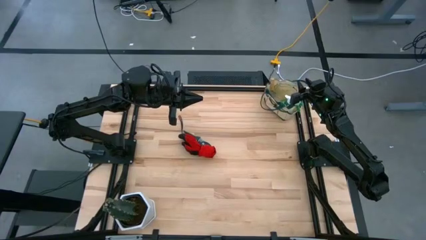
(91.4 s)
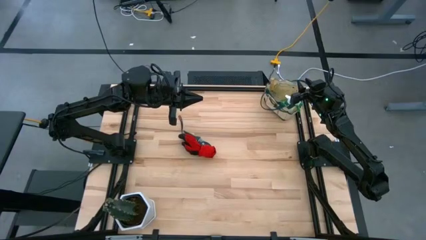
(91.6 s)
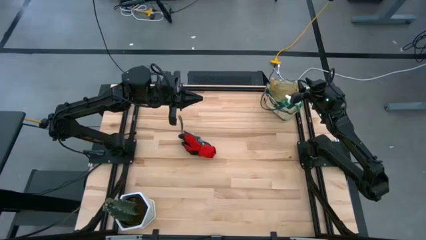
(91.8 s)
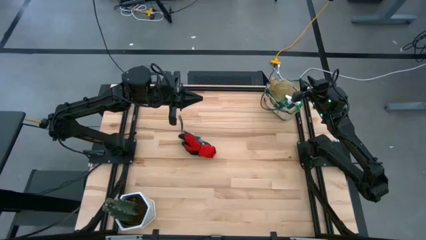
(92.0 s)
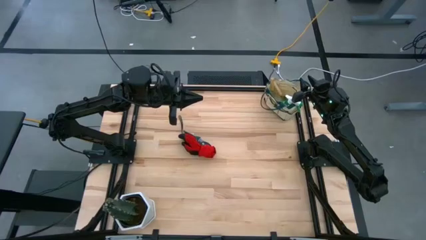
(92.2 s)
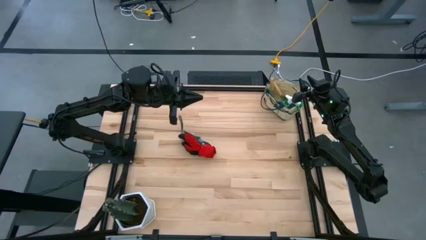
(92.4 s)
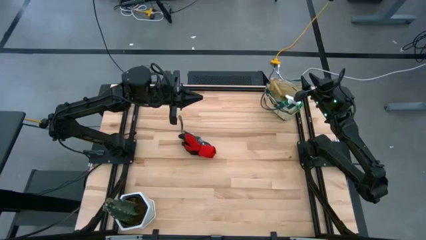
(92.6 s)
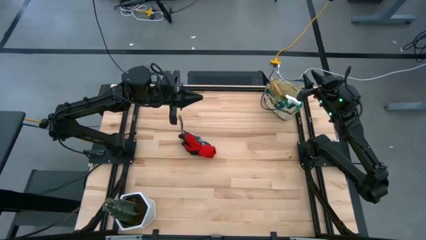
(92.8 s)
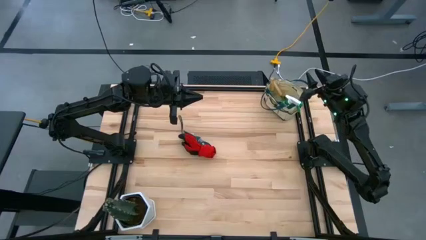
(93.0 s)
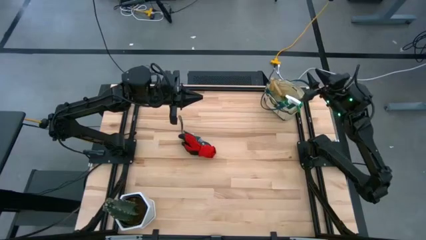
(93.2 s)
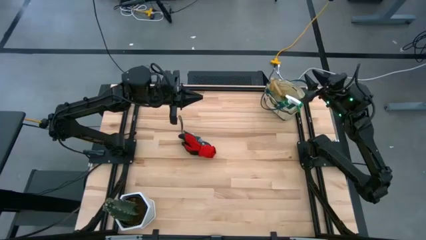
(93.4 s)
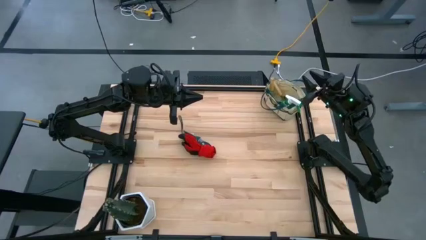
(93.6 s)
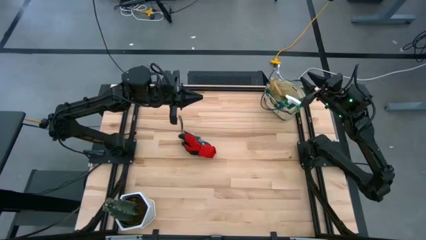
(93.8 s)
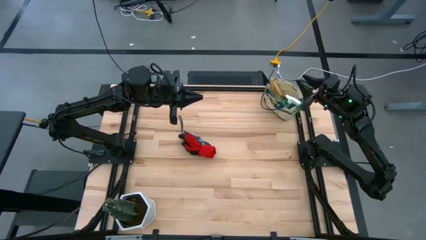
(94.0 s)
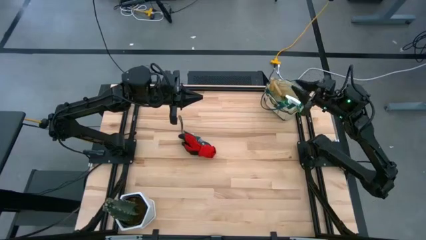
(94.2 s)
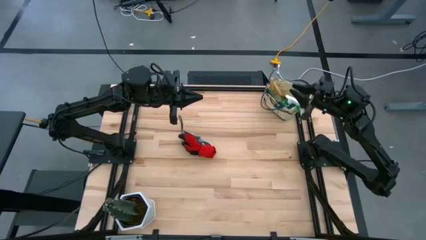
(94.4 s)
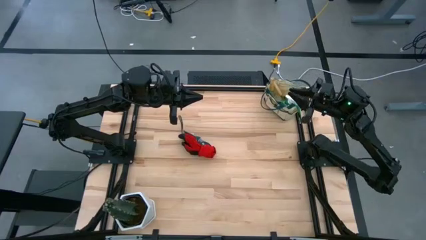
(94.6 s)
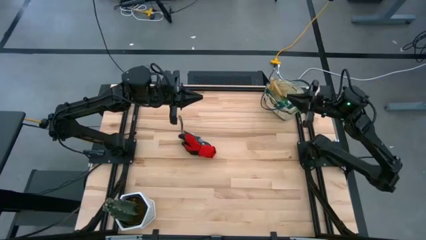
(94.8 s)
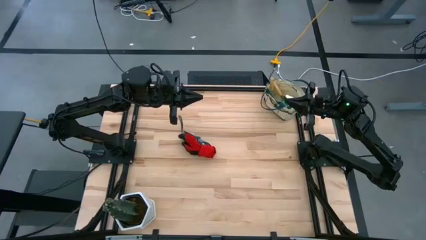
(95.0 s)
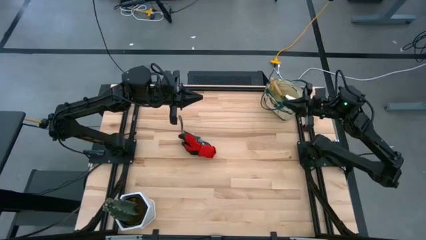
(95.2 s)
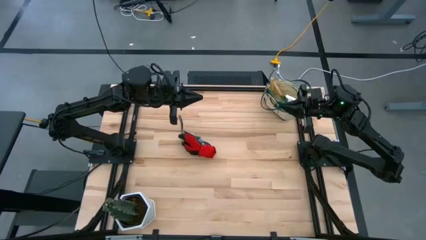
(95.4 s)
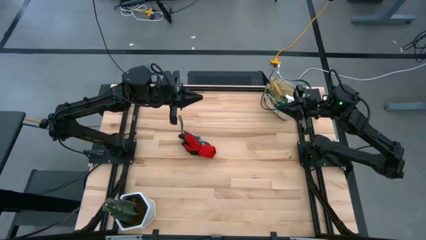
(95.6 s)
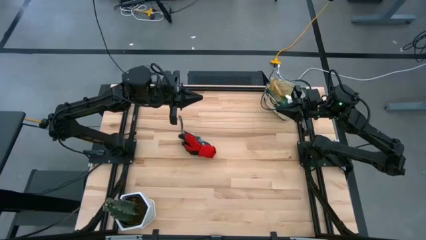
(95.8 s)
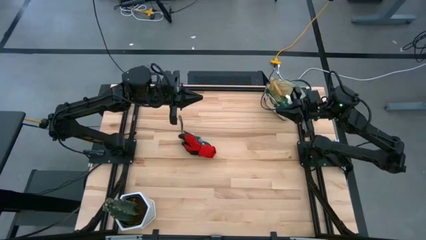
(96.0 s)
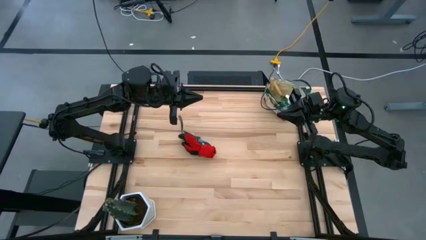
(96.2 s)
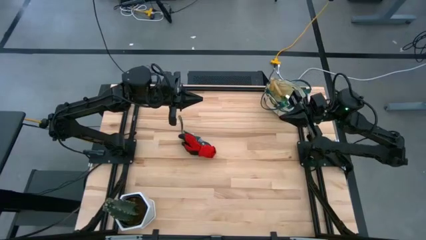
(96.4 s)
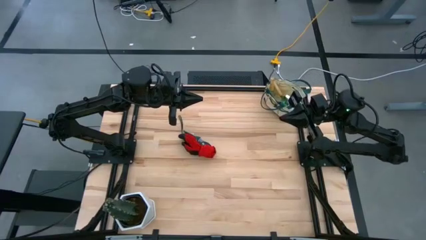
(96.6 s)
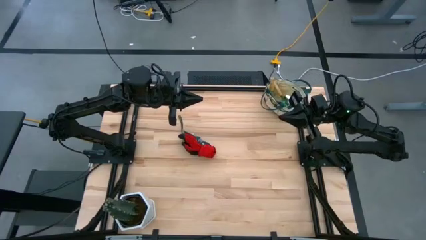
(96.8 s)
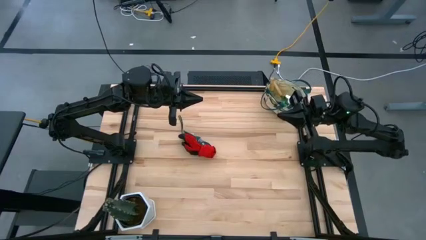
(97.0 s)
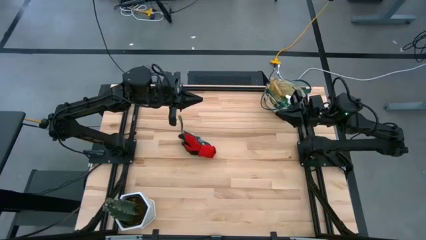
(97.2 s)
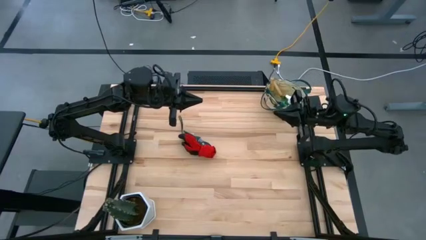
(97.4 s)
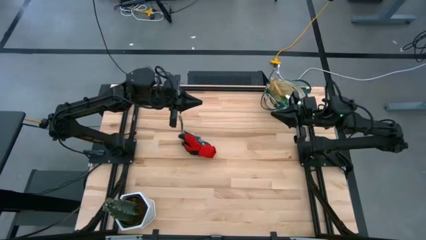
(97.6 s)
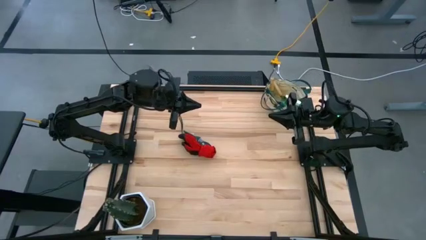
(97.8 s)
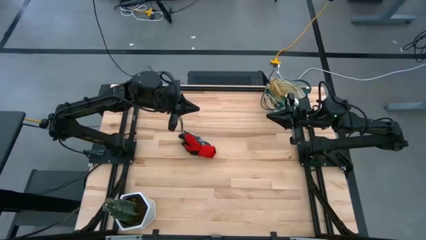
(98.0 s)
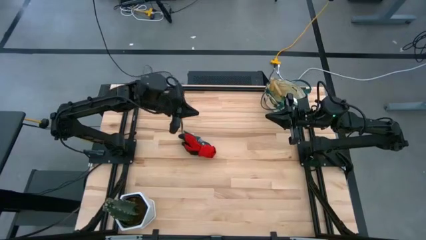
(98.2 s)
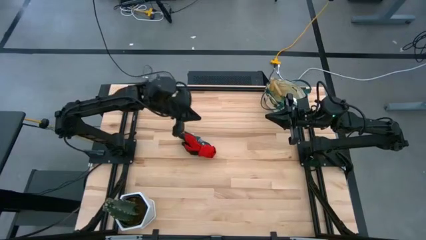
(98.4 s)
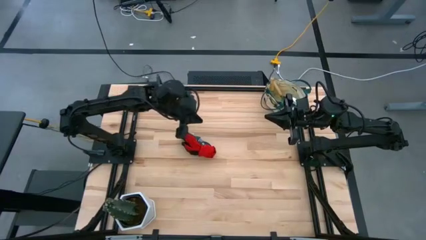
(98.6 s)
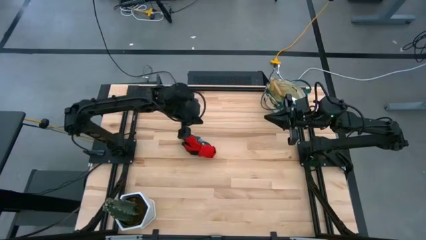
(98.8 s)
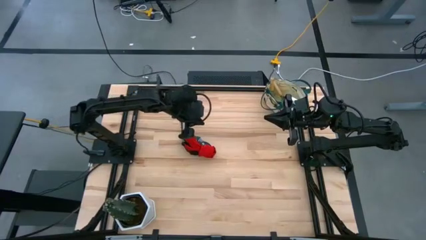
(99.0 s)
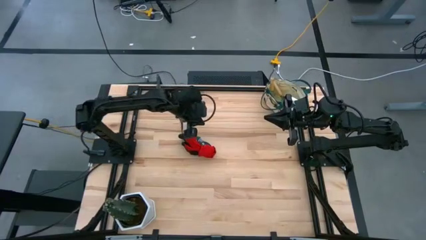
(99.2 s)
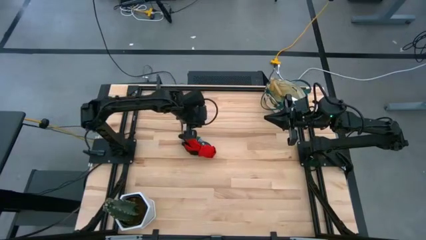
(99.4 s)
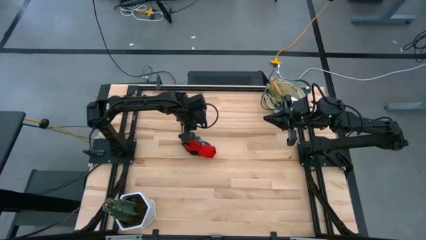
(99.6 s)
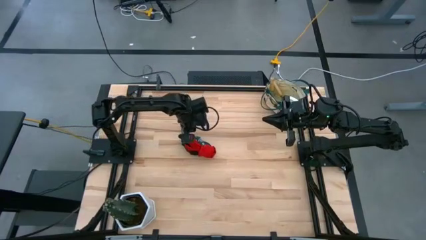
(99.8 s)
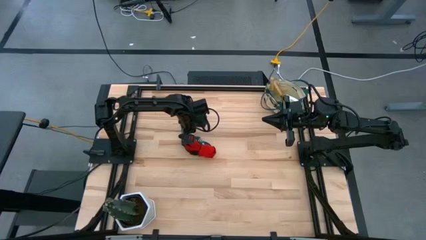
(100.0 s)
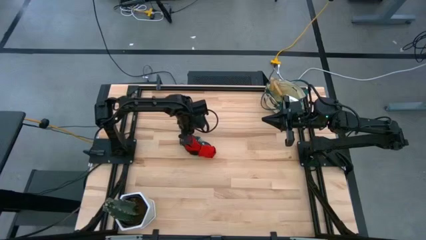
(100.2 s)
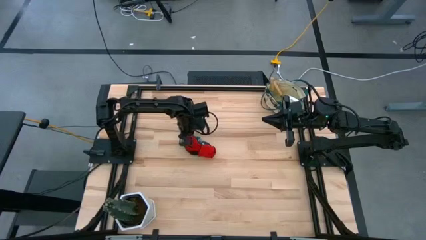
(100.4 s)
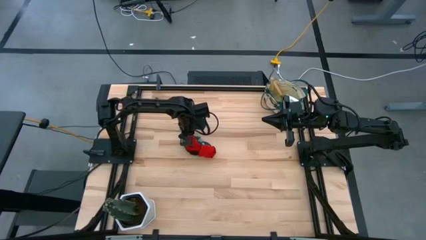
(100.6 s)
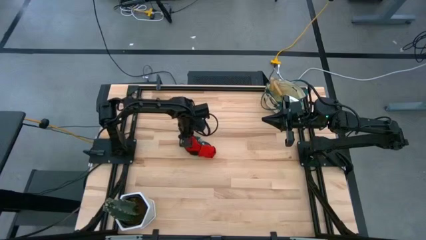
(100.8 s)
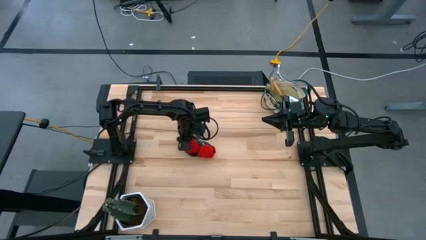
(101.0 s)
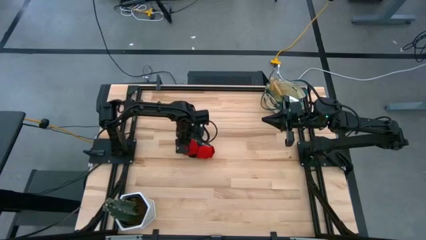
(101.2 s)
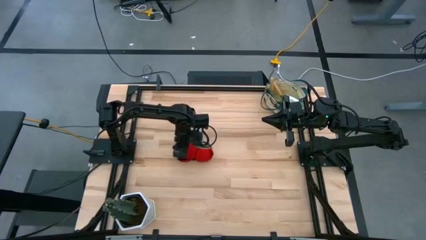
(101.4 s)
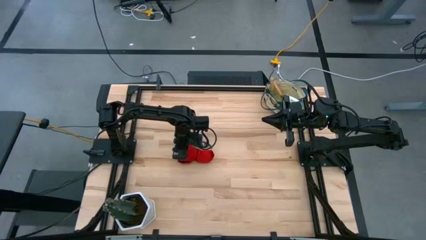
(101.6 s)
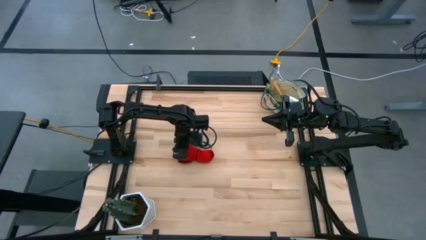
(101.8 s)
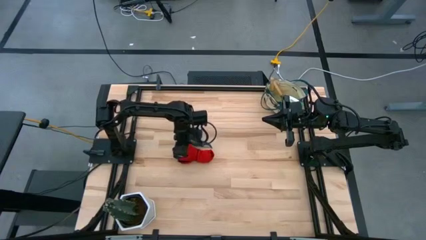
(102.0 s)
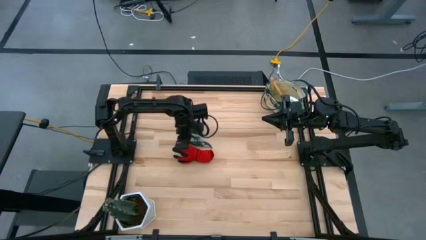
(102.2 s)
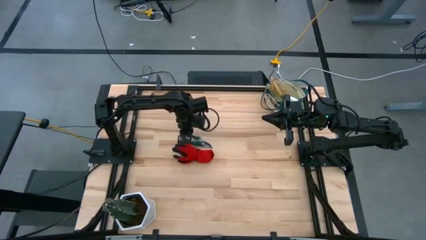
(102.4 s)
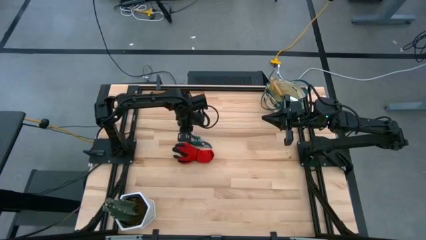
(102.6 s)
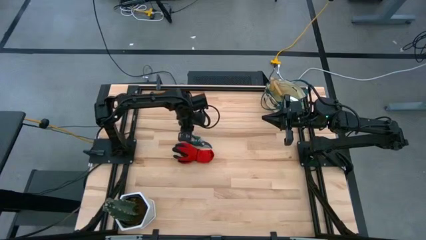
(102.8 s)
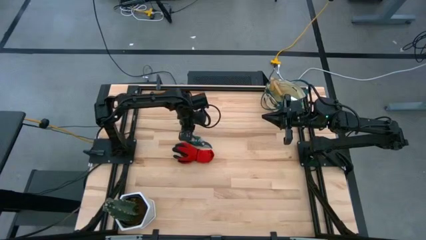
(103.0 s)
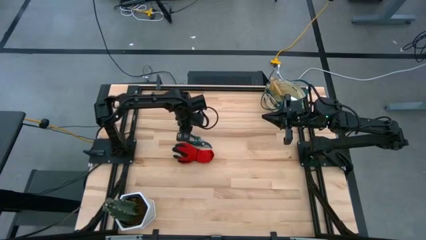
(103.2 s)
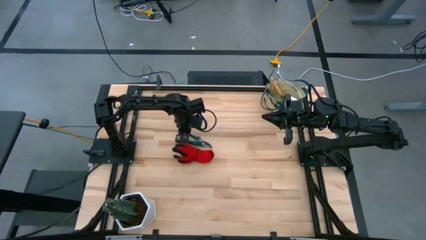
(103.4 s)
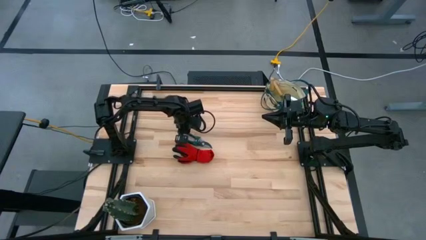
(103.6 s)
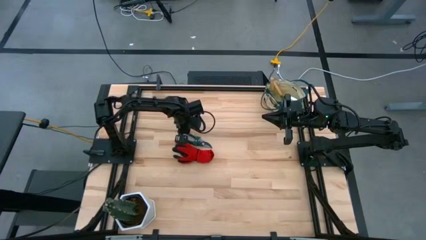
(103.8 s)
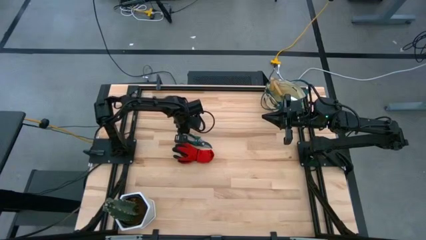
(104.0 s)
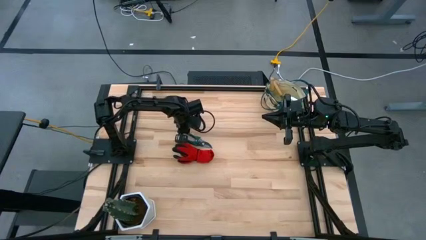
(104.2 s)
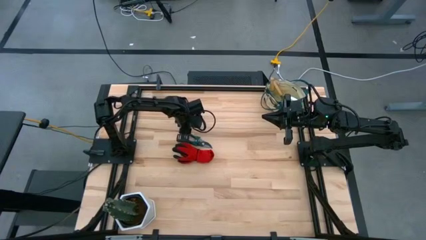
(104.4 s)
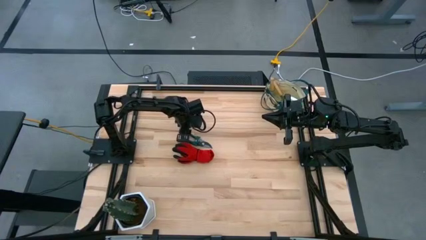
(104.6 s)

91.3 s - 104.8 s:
Task: Pick & Place Garden tools in Gardening bag
Put the green shear scissors into the gardening bag
